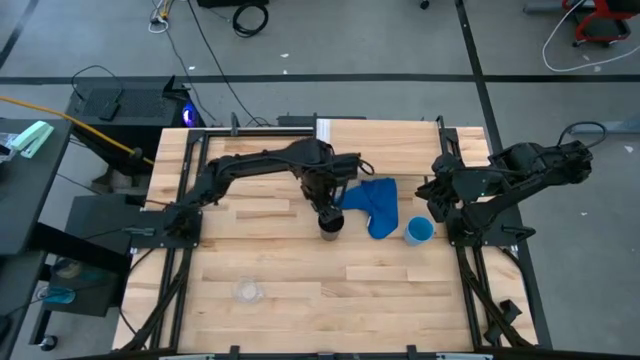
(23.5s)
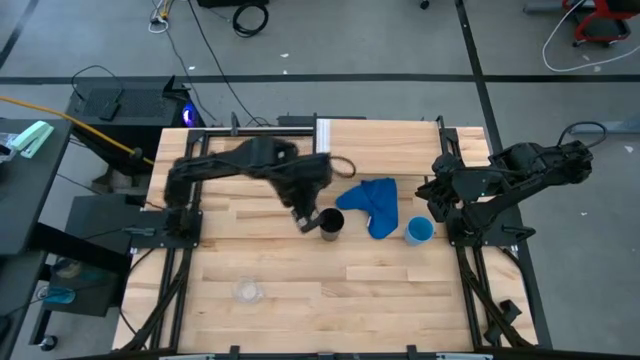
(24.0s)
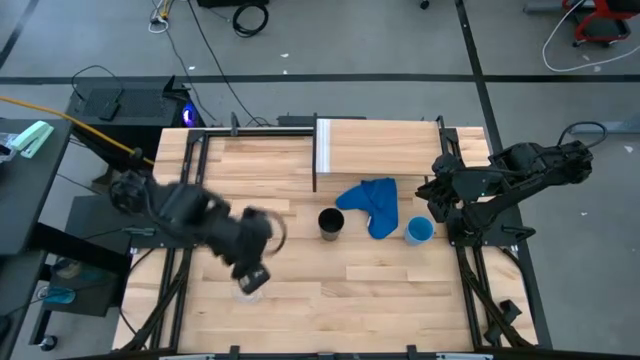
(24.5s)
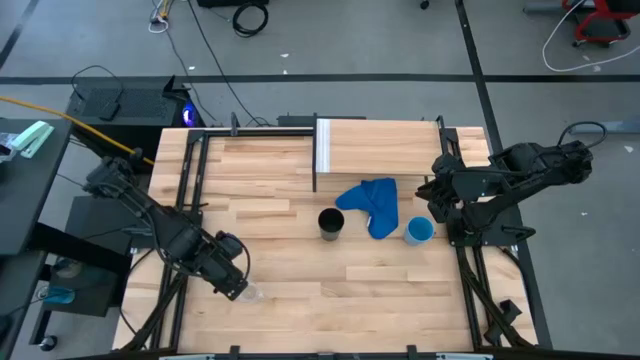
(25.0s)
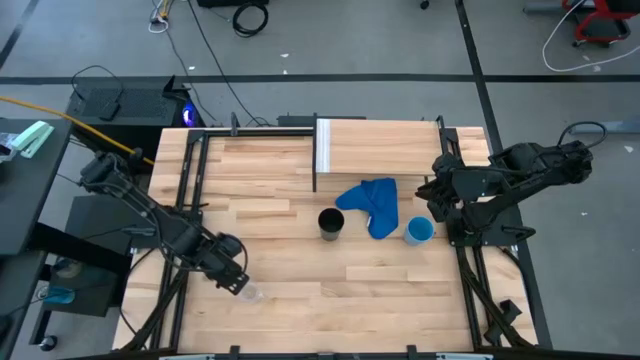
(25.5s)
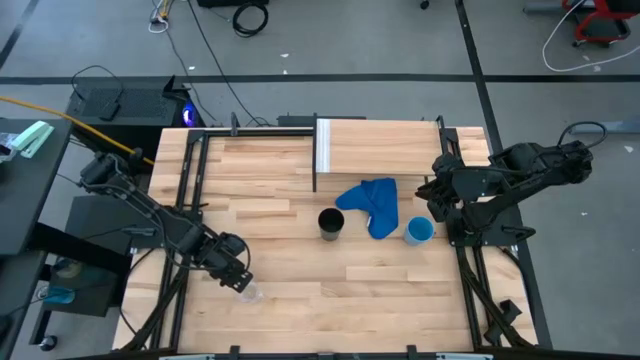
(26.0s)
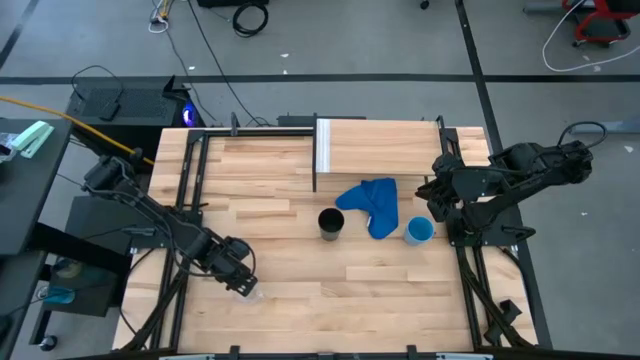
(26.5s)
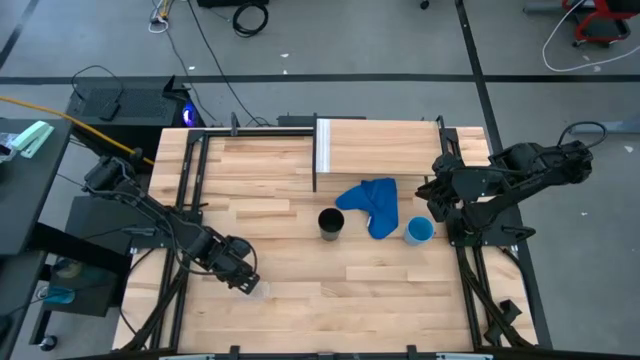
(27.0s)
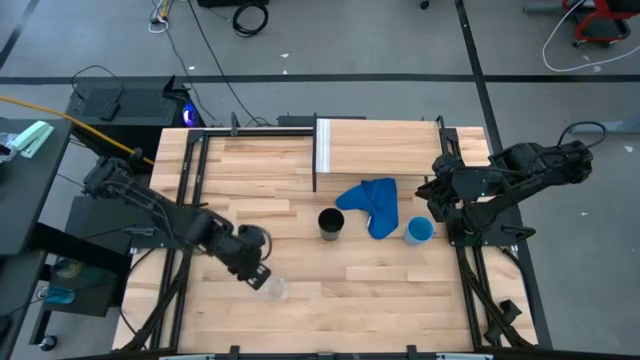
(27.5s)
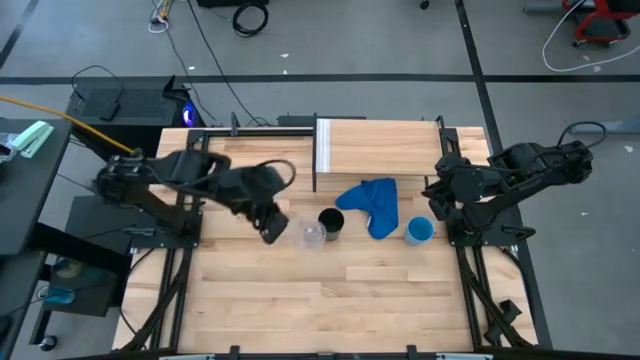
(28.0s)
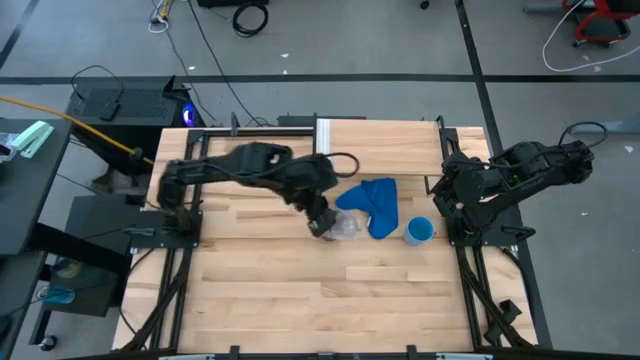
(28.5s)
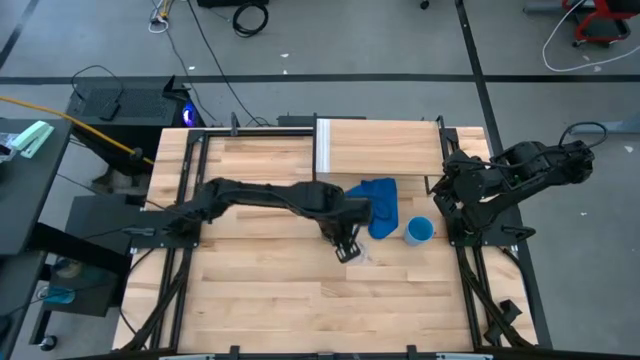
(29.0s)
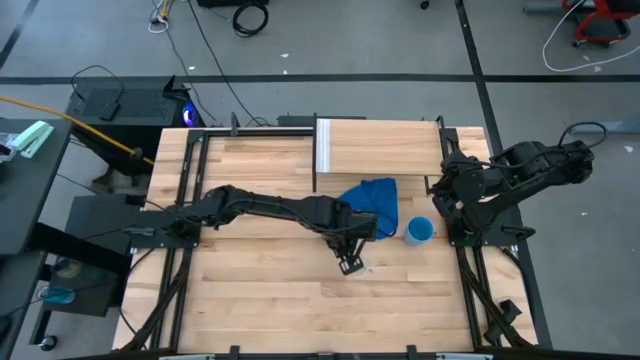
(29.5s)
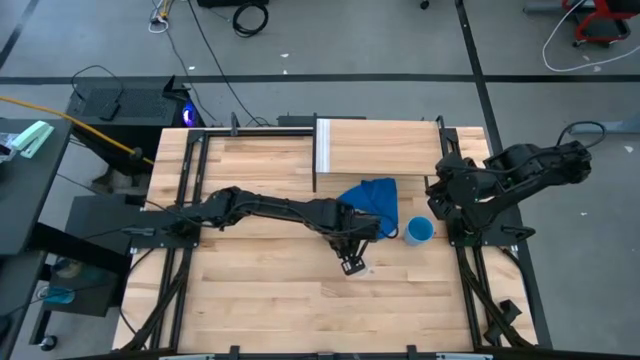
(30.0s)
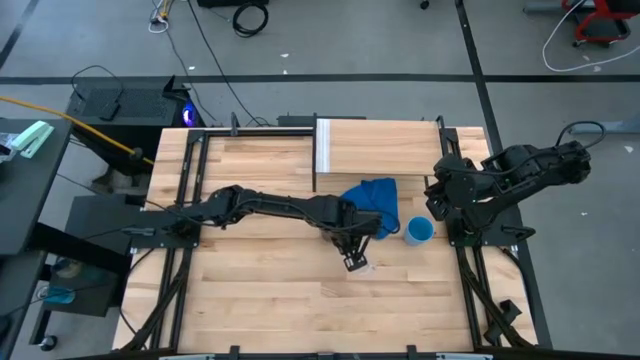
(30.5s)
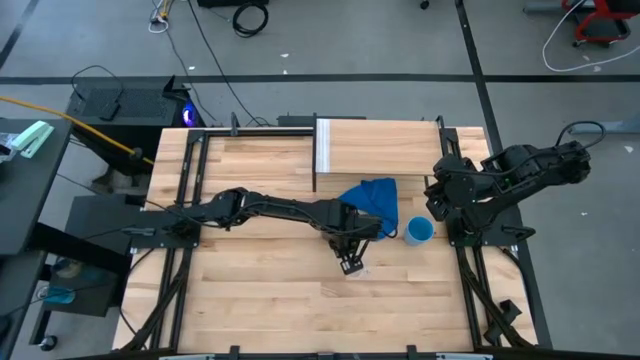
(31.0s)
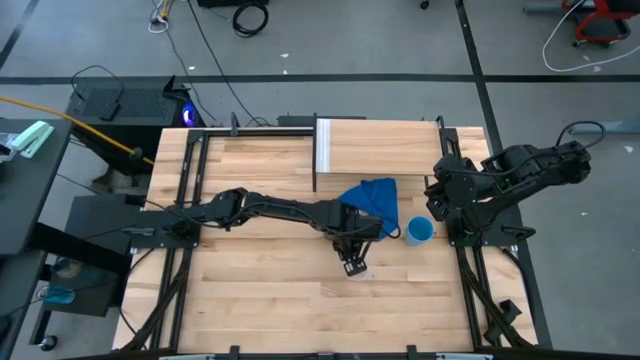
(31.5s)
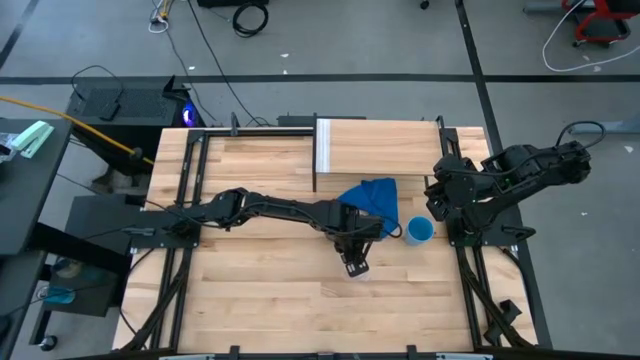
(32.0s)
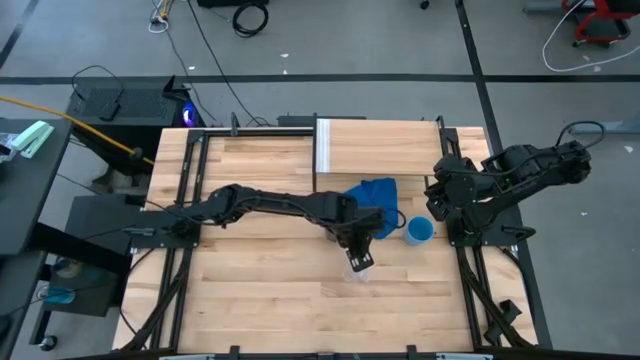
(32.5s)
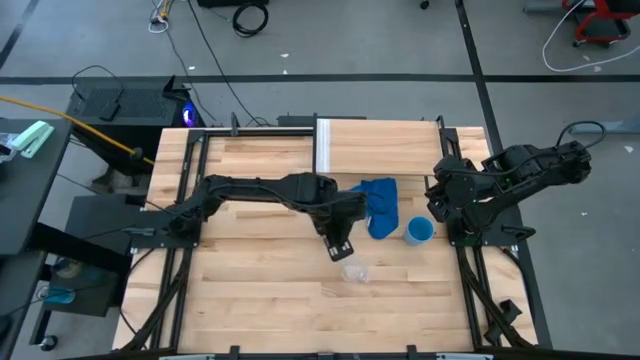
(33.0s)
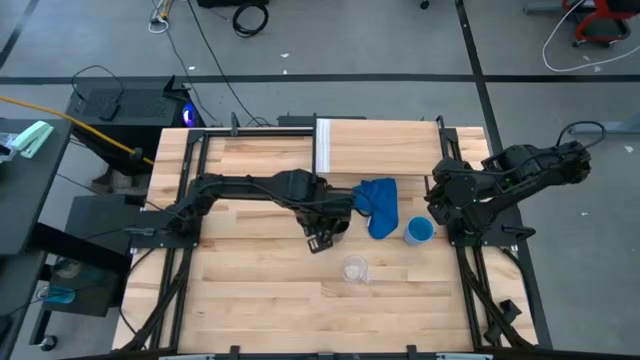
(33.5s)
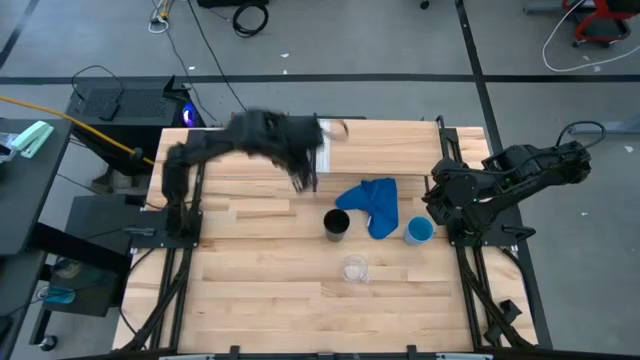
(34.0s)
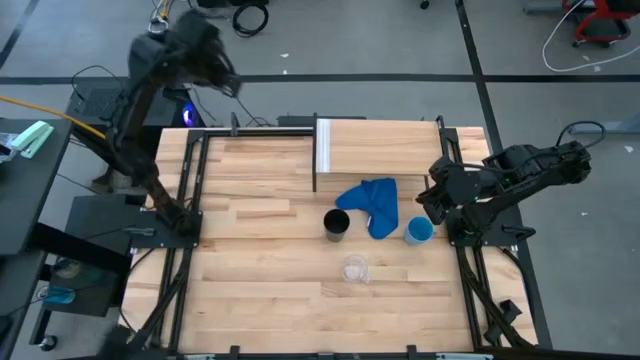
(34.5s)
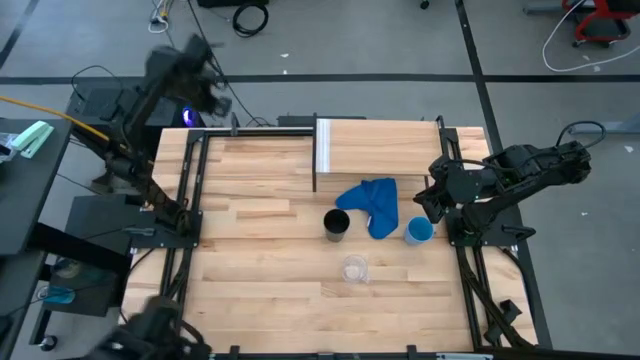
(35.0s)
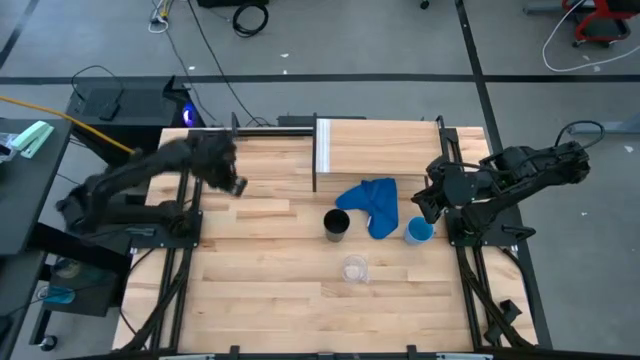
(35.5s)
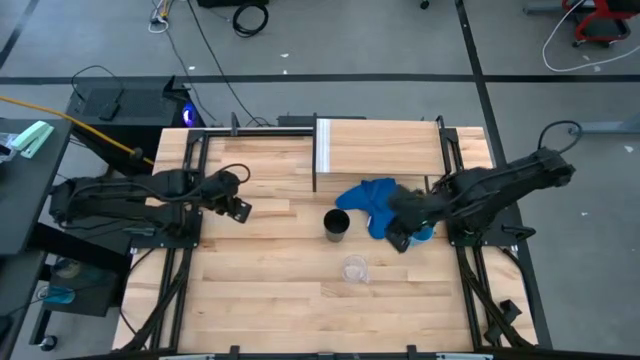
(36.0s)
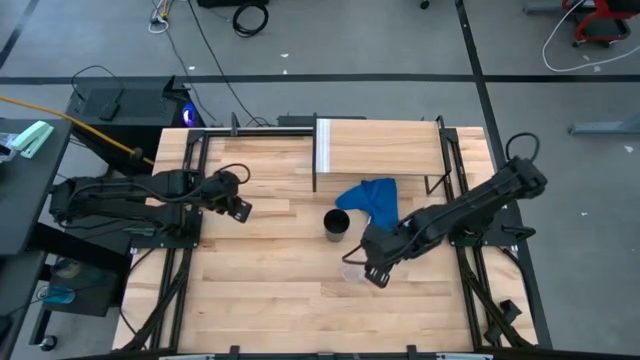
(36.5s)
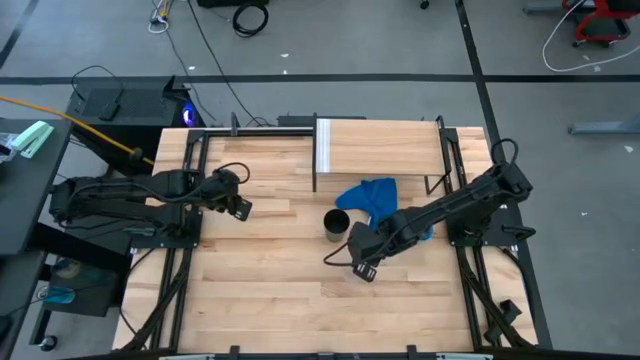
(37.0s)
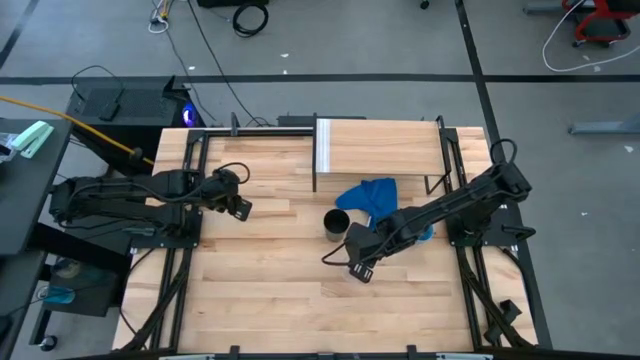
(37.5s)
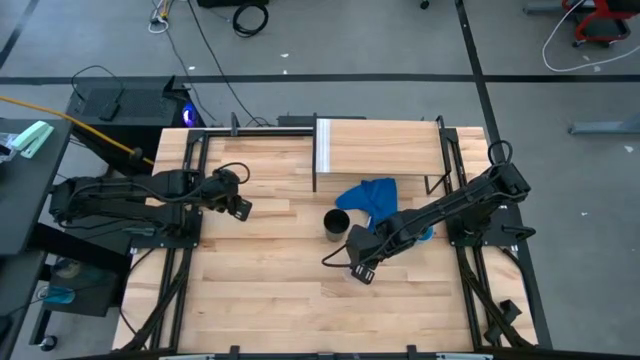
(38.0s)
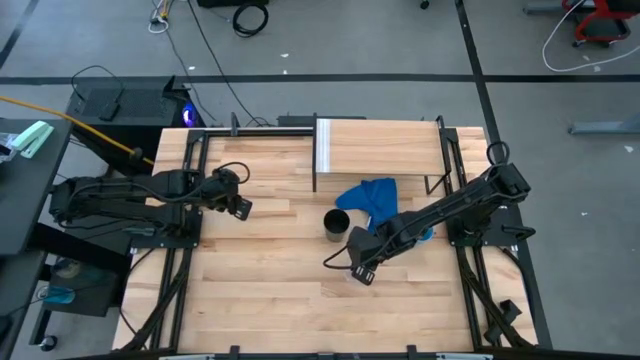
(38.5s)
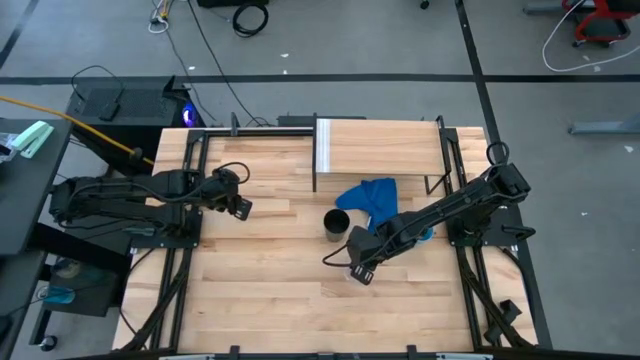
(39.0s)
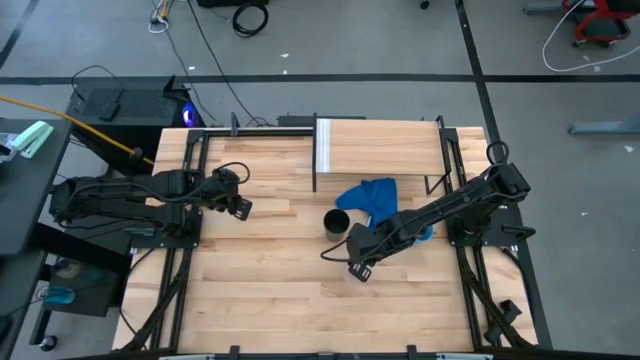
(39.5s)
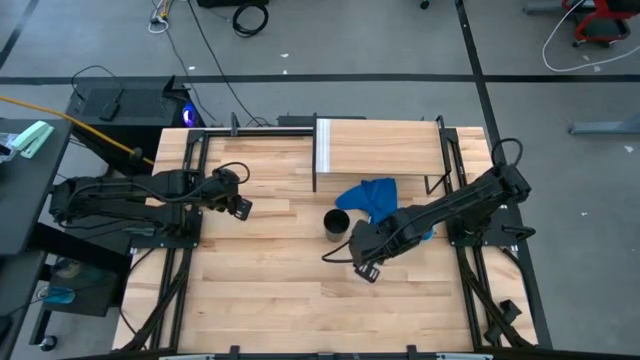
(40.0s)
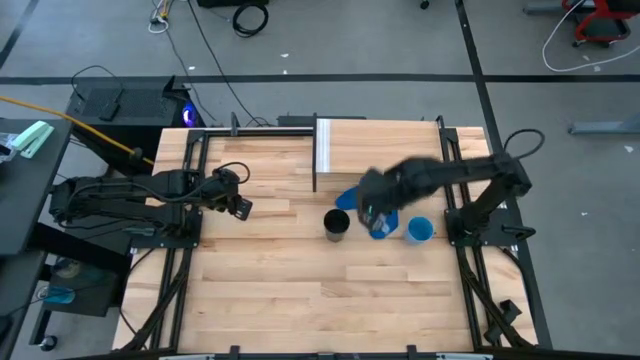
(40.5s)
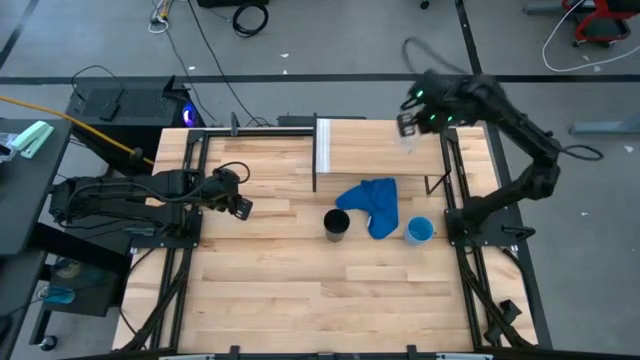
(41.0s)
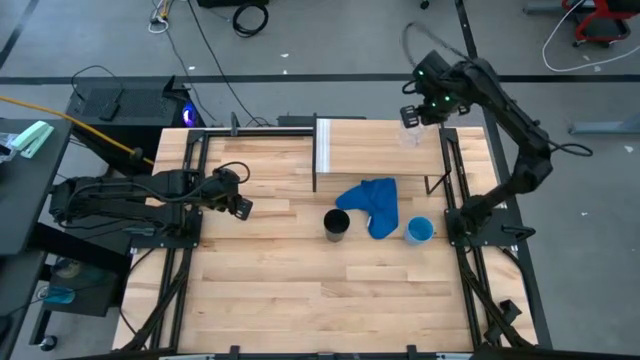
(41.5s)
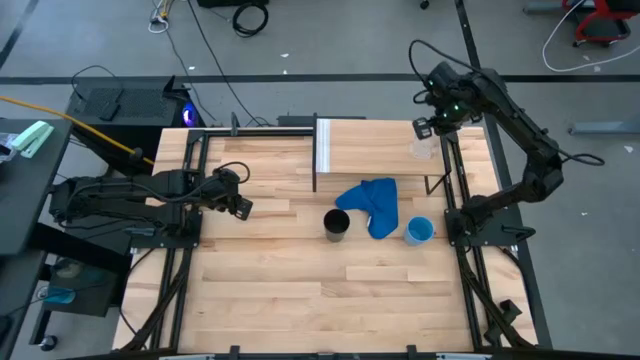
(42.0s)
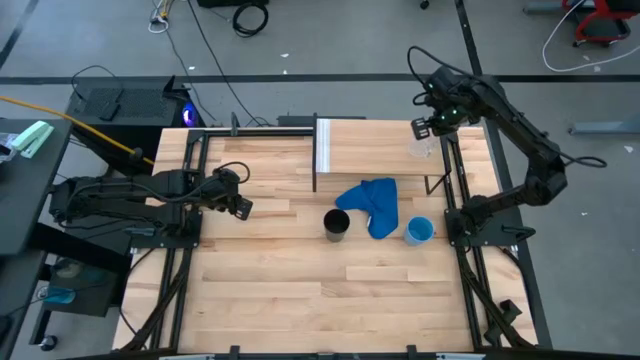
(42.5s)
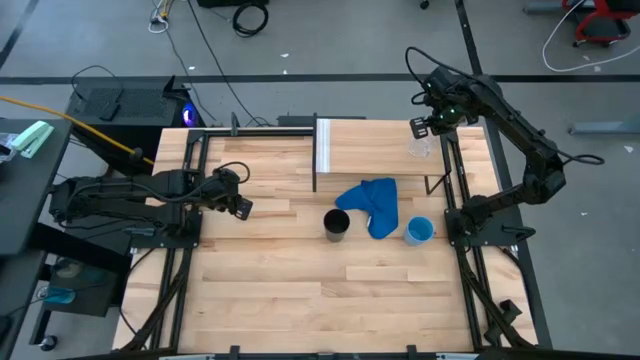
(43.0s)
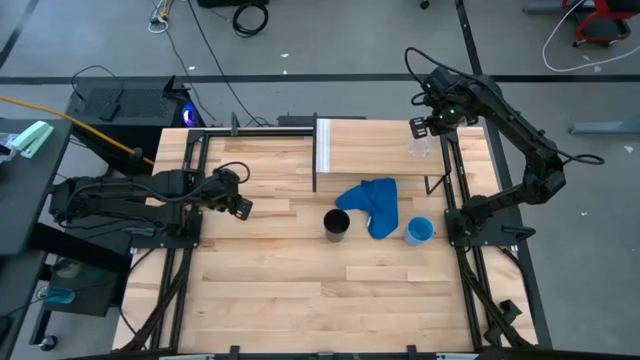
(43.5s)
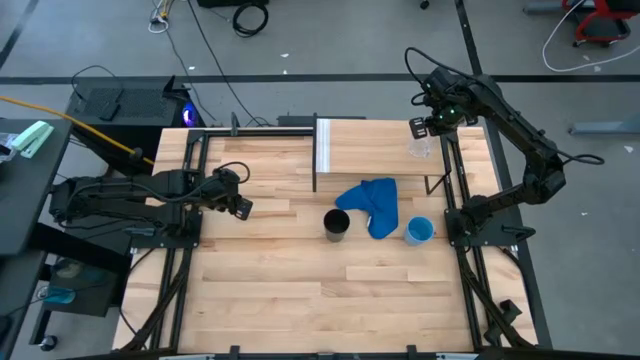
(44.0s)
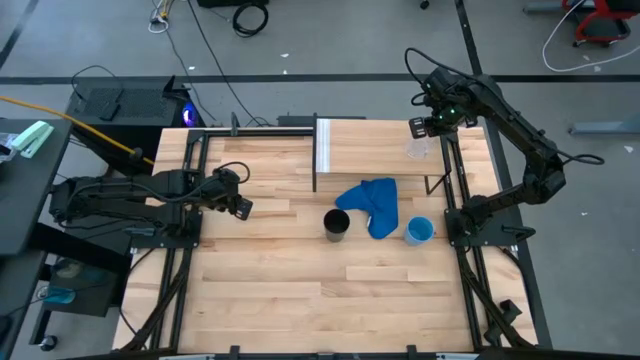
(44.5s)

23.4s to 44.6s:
Task: Stack small to large cups/mugs on shelf
Put the transparent mug on the shelf
